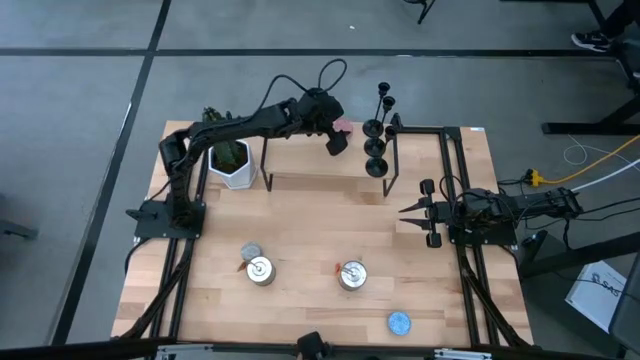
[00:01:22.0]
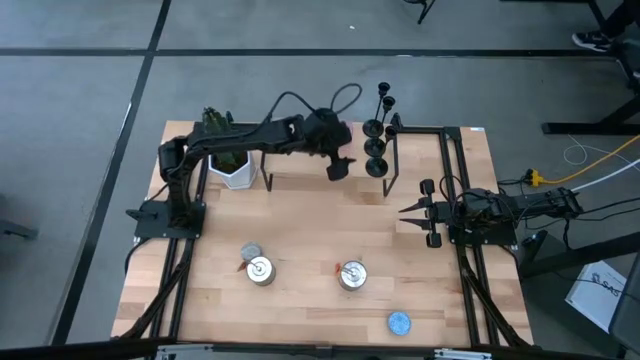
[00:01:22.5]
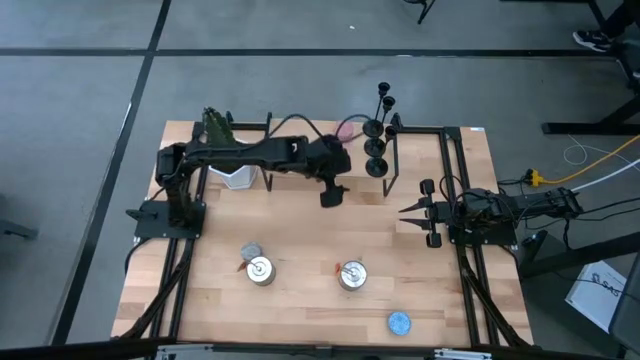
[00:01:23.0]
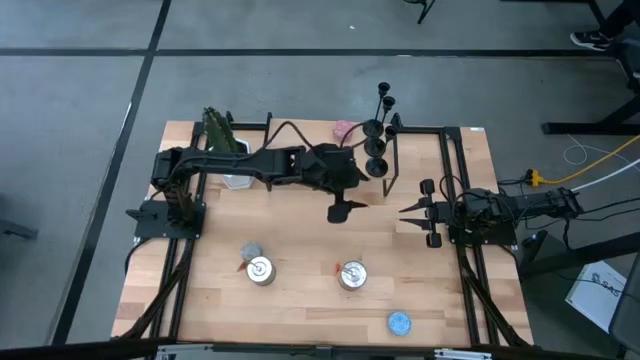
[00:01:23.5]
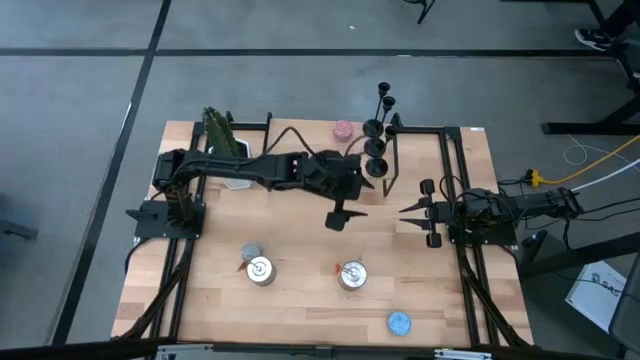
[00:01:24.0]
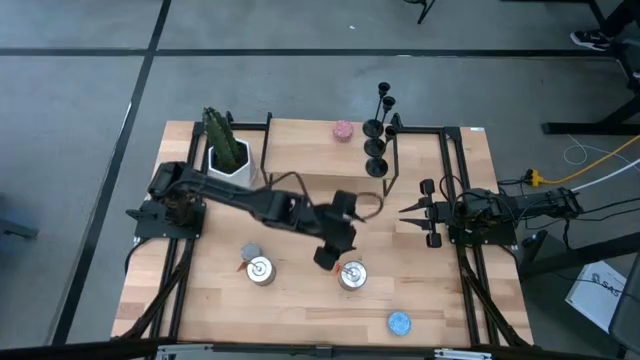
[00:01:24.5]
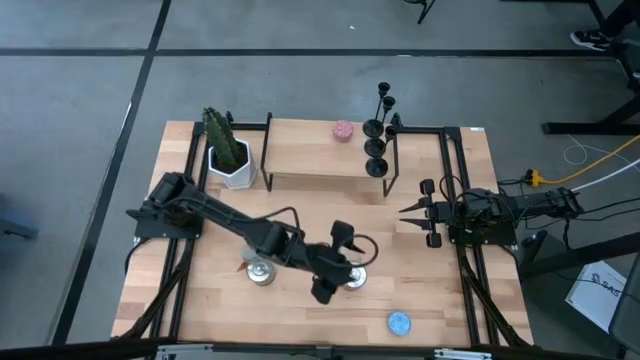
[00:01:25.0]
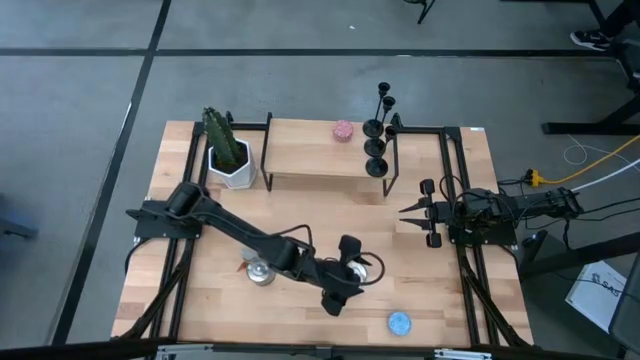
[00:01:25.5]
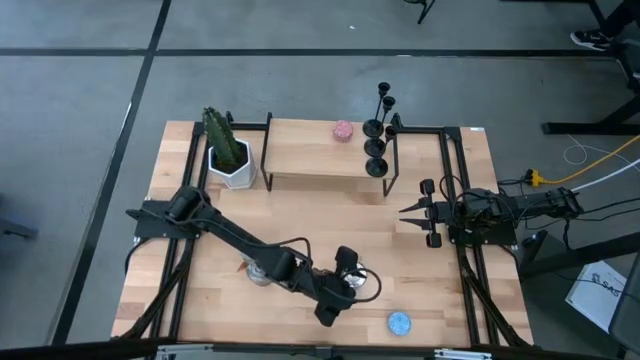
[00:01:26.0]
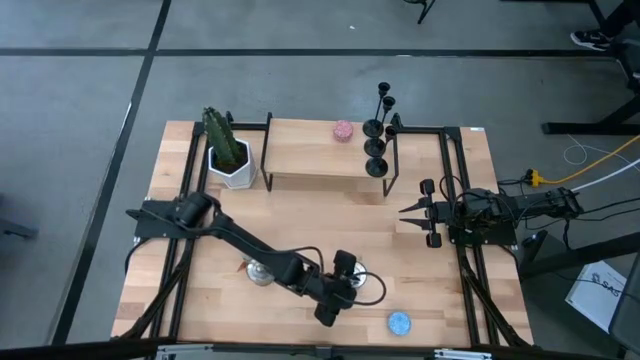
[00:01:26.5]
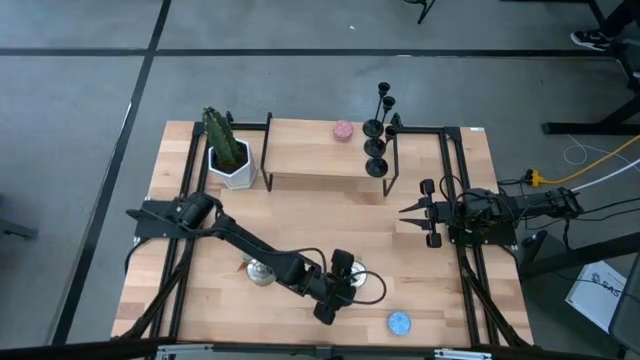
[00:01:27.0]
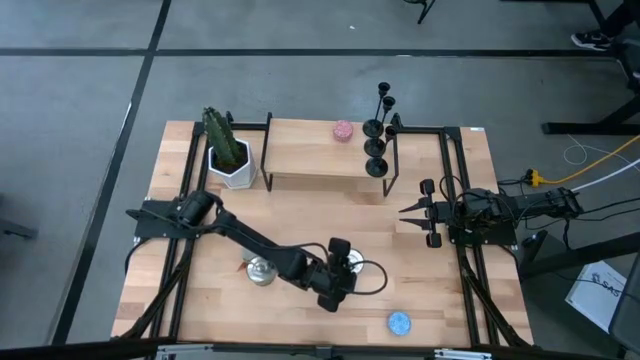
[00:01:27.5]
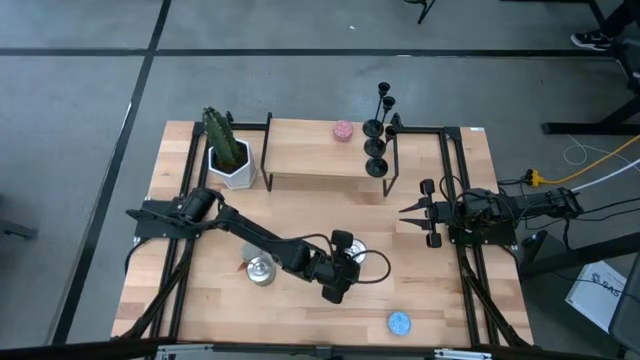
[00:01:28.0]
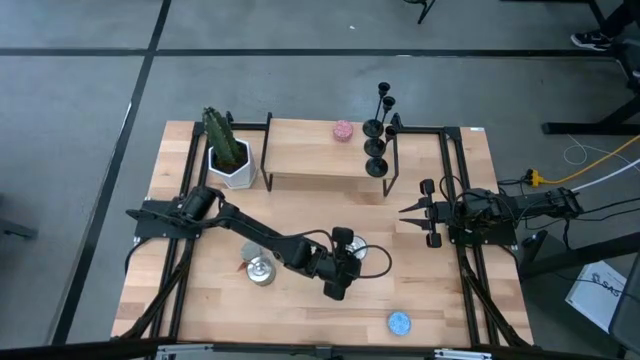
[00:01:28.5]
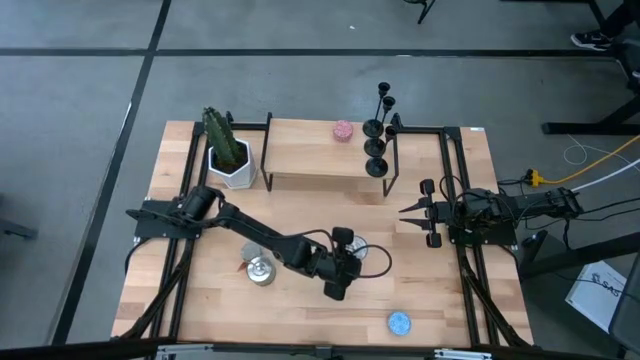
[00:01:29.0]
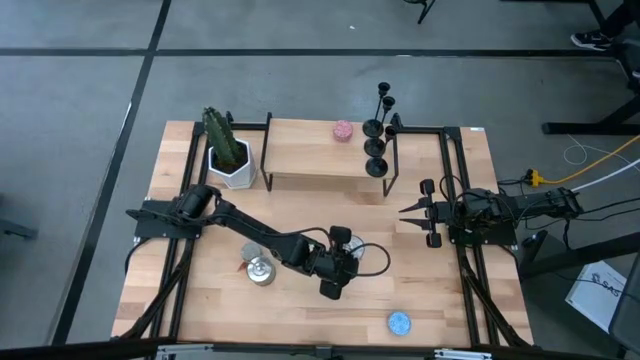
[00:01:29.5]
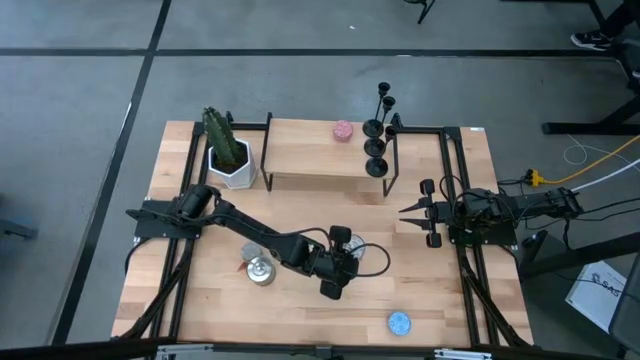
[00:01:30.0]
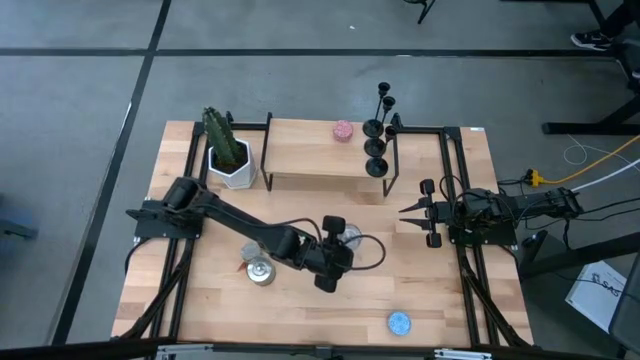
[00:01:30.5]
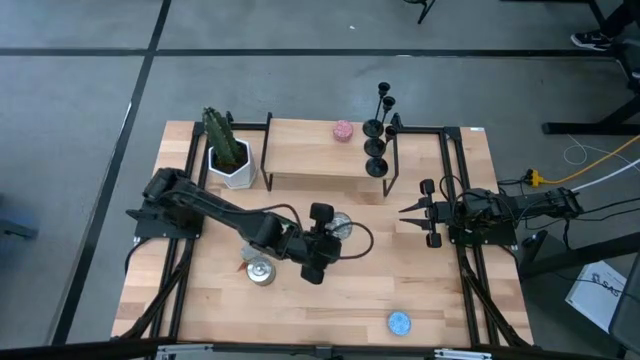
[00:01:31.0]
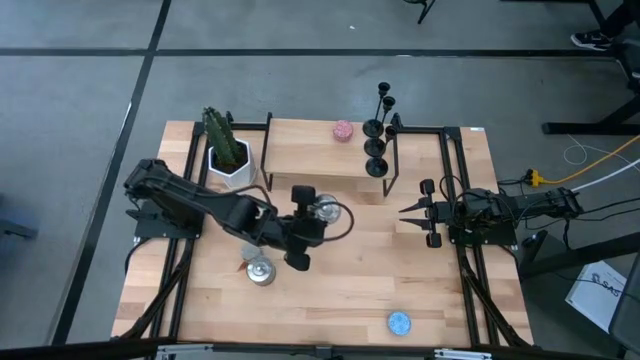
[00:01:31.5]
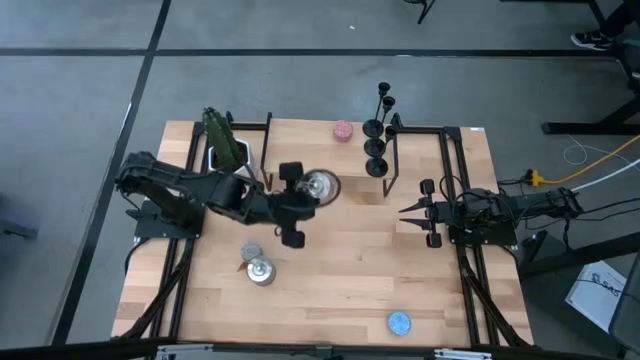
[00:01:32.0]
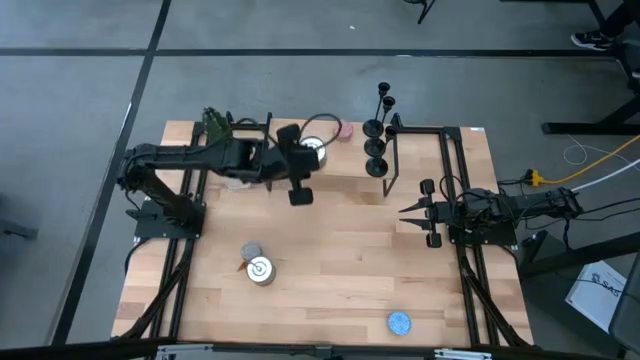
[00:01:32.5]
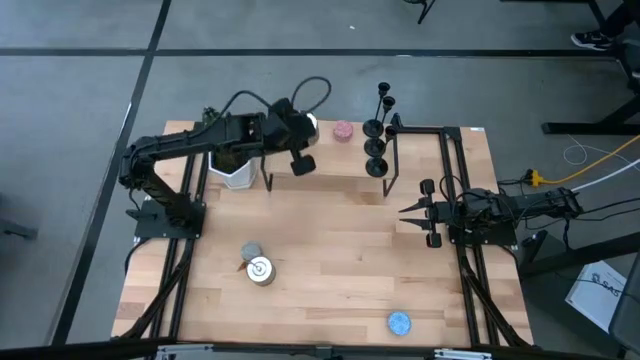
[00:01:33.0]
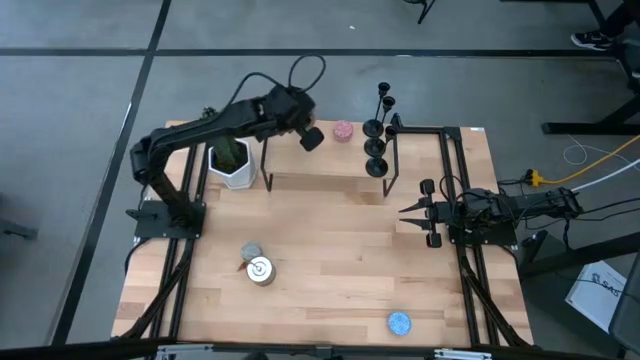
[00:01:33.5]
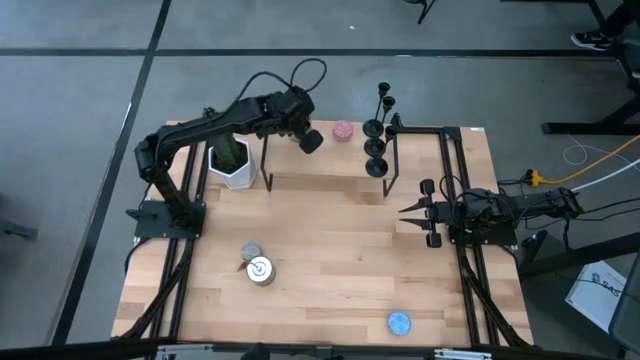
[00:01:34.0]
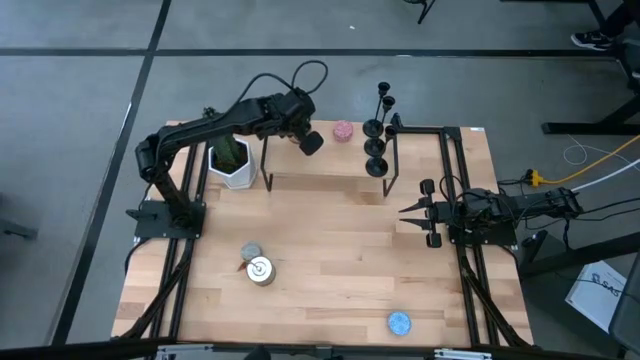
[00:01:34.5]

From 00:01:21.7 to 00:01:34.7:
Task: Pick & Place candle stick holders
Put the left silver scented candle on the shelf

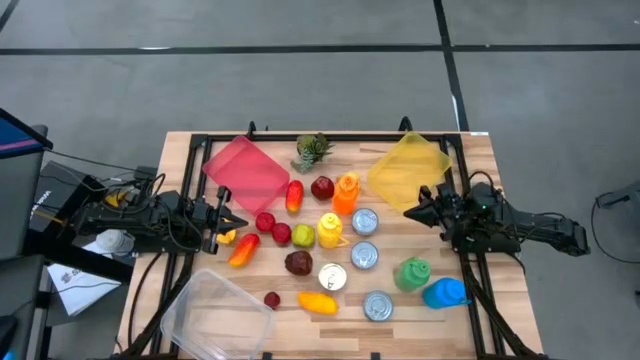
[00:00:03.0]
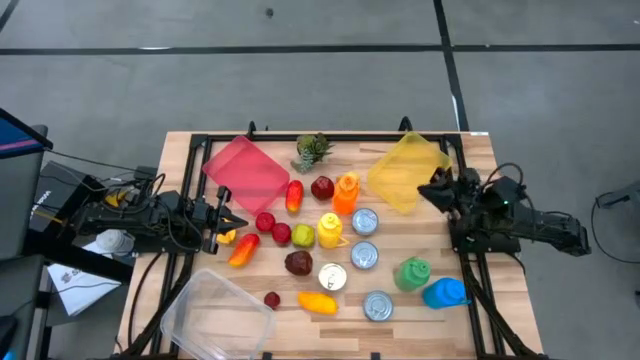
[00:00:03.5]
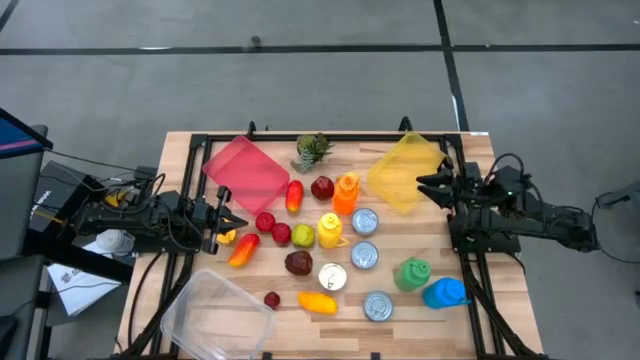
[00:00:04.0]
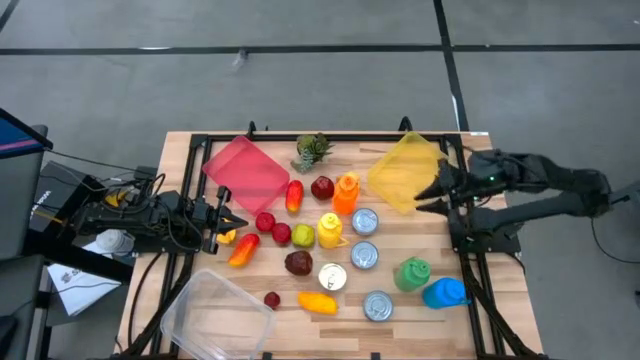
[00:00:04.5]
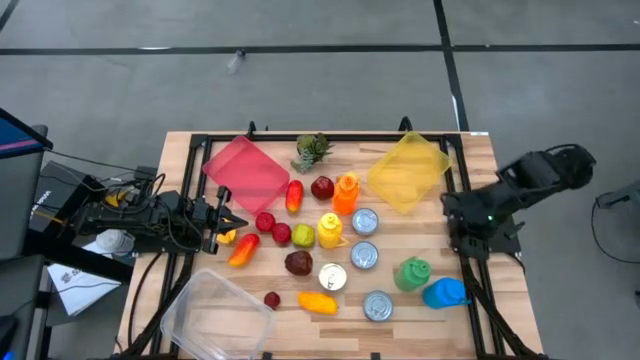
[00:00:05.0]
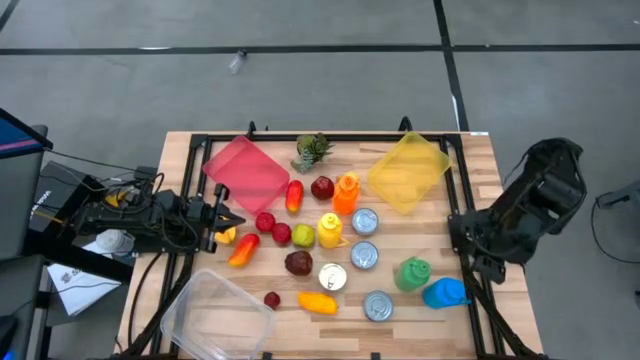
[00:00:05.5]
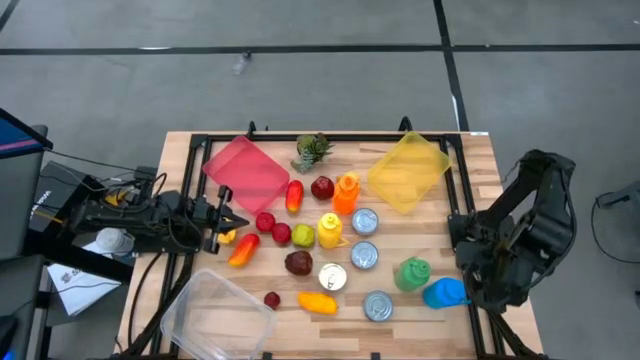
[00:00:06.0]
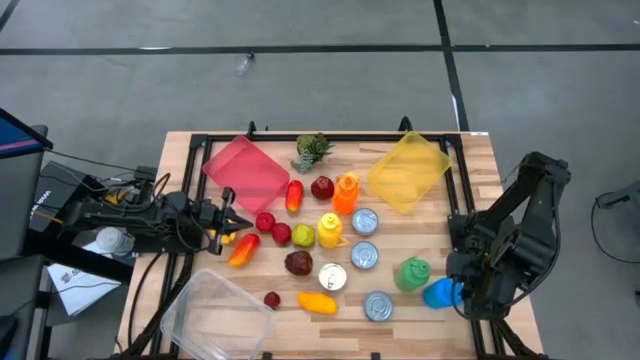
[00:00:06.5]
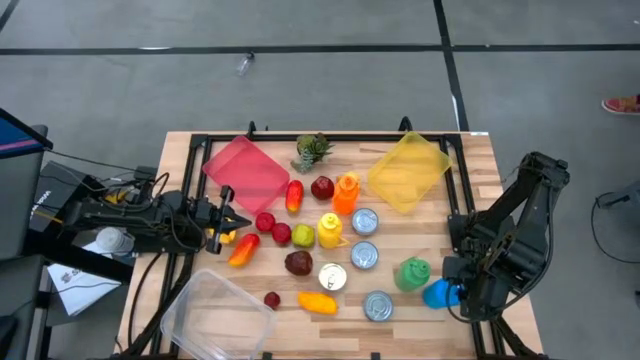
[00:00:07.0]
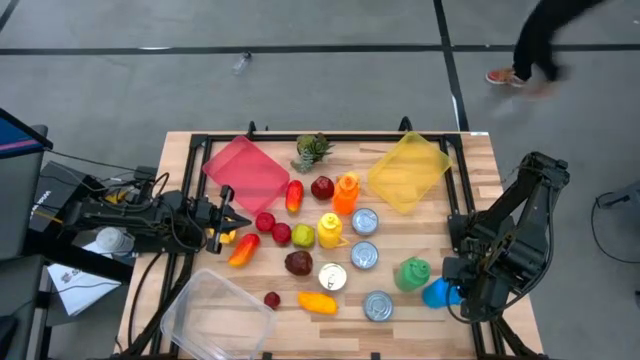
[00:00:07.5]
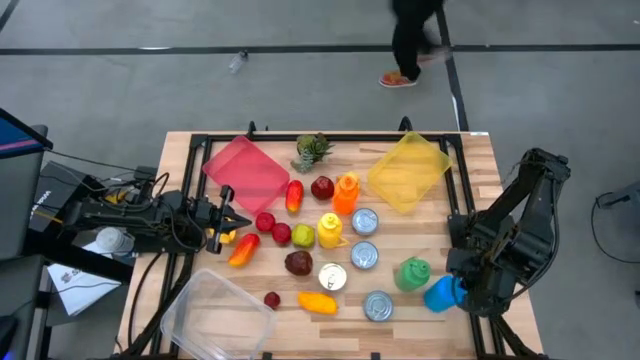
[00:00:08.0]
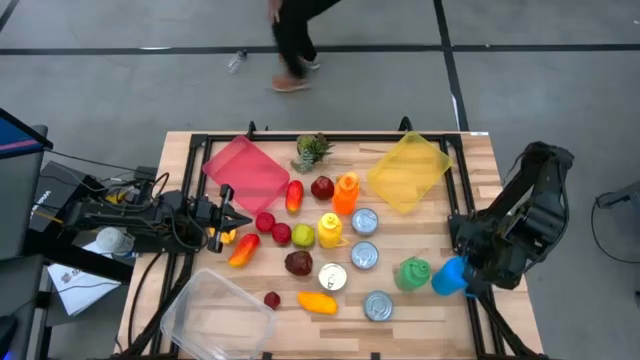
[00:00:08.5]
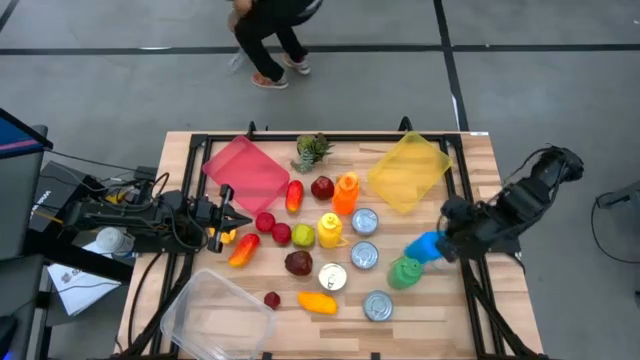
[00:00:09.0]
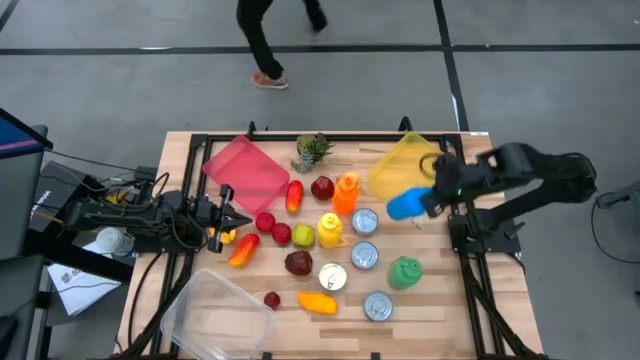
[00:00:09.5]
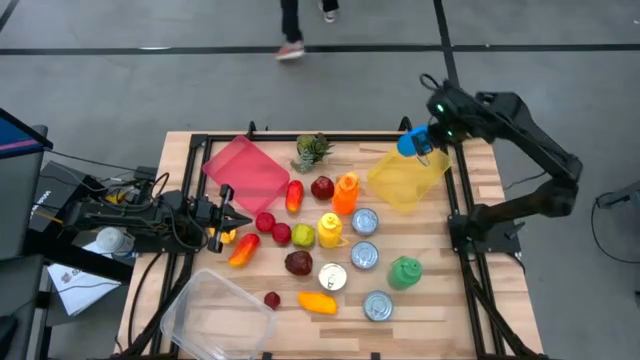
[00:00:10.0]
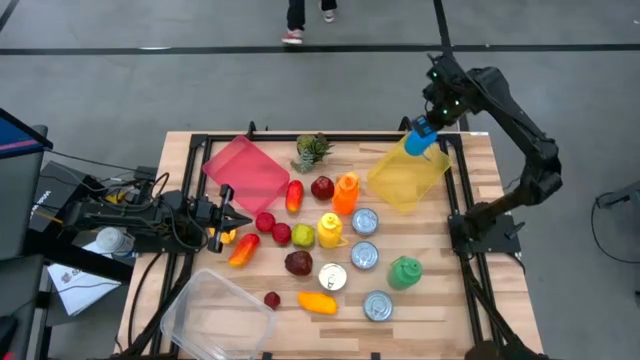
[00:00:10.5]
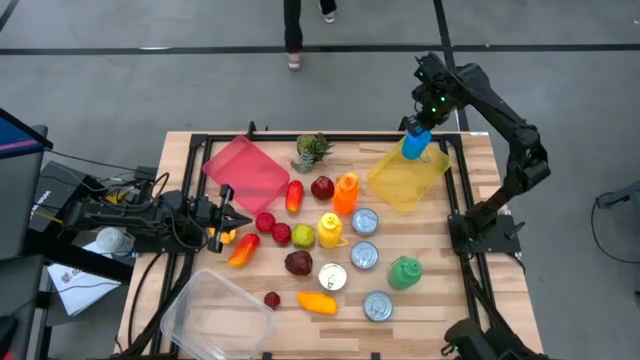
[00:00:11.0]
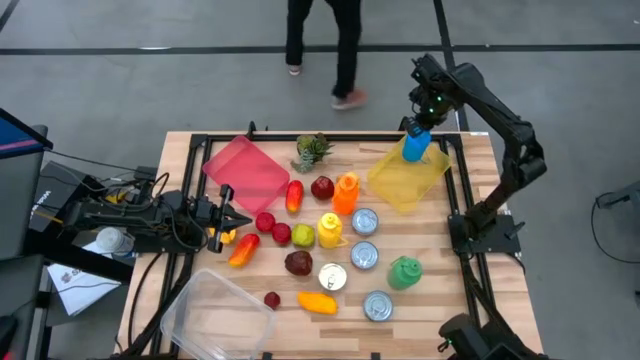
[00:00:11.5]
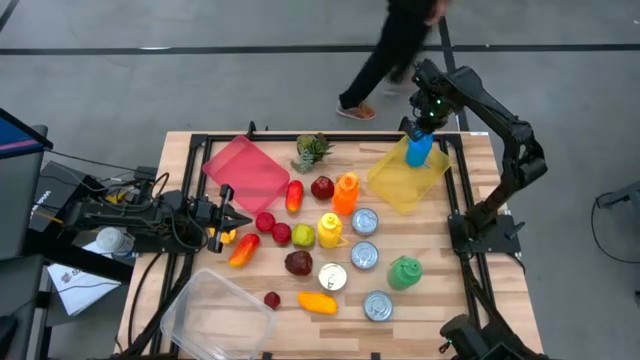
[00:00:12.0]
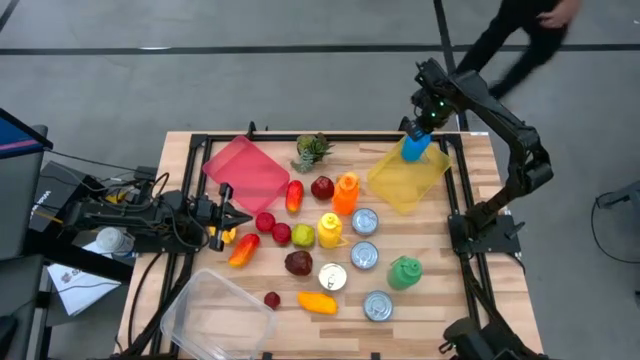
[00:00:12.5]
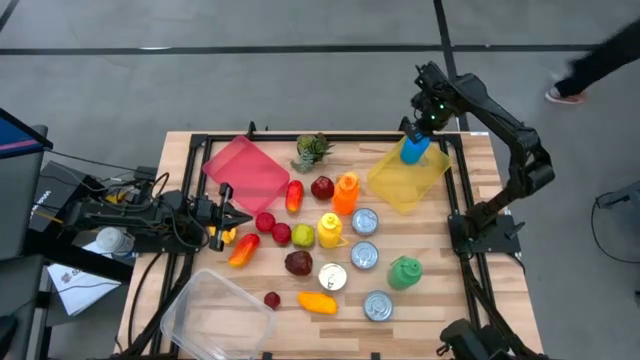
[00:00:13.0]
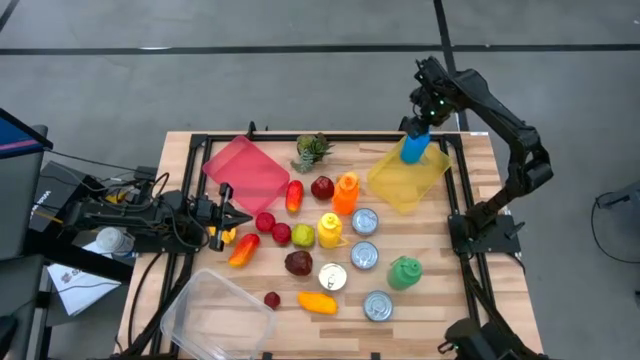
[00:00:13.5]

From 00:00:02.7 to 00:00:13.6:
Task: Pick & Place Food Item
Put the blue tumbler into the yellow bin
